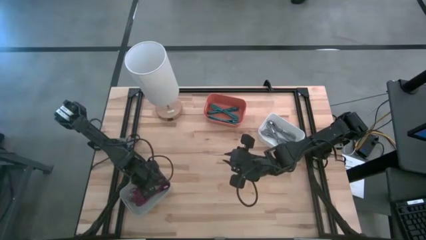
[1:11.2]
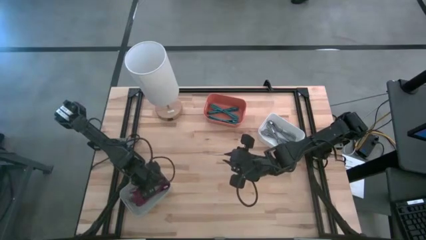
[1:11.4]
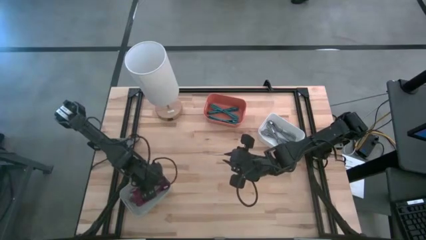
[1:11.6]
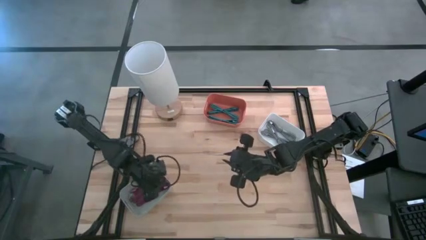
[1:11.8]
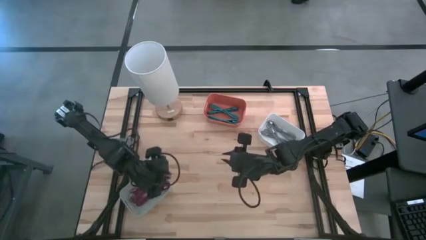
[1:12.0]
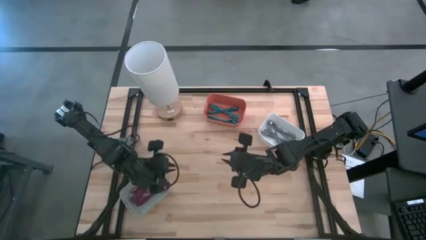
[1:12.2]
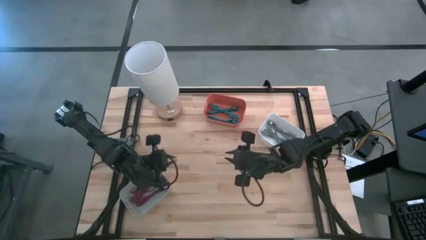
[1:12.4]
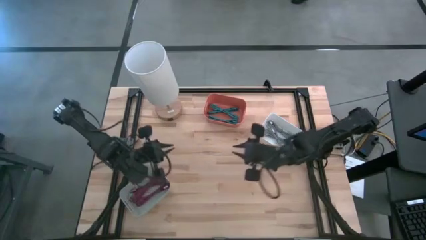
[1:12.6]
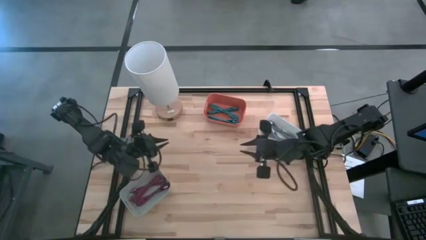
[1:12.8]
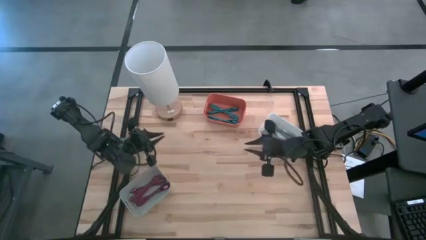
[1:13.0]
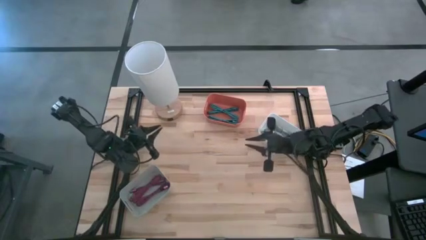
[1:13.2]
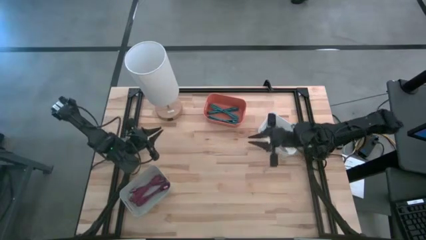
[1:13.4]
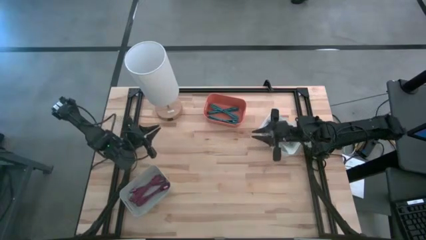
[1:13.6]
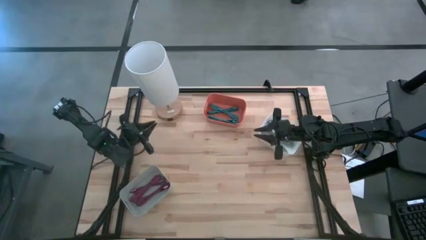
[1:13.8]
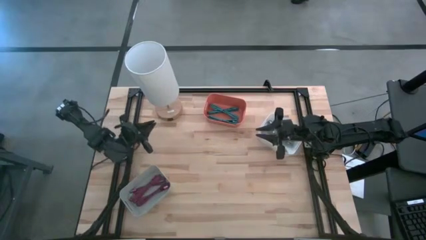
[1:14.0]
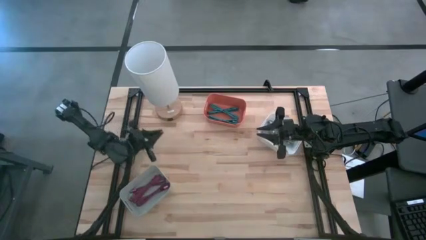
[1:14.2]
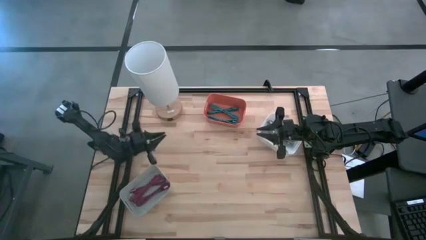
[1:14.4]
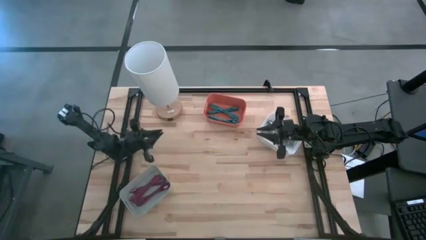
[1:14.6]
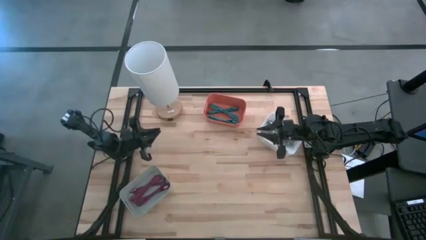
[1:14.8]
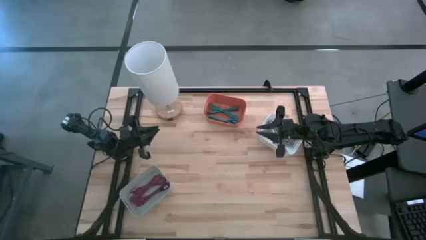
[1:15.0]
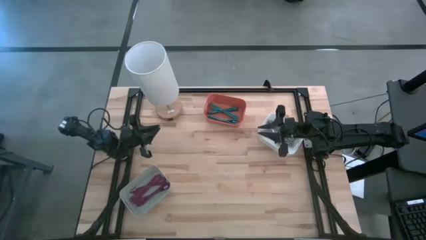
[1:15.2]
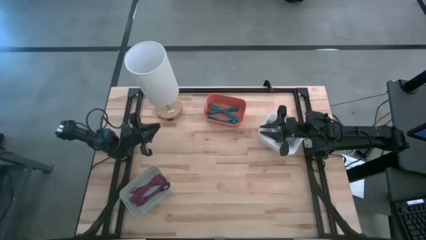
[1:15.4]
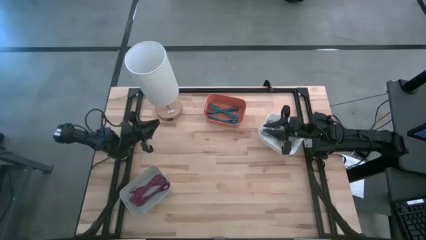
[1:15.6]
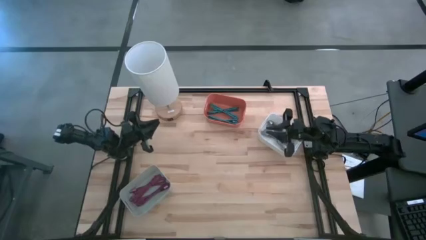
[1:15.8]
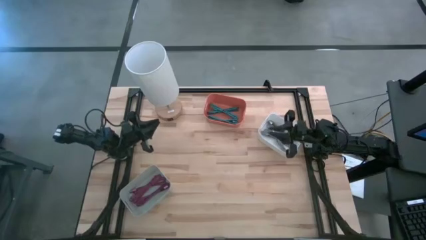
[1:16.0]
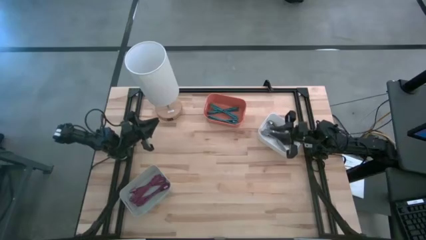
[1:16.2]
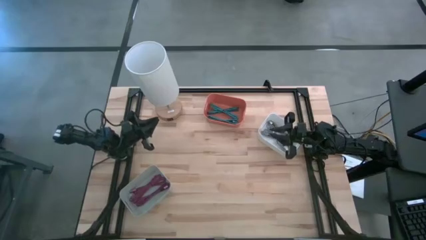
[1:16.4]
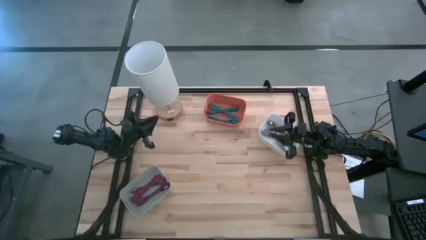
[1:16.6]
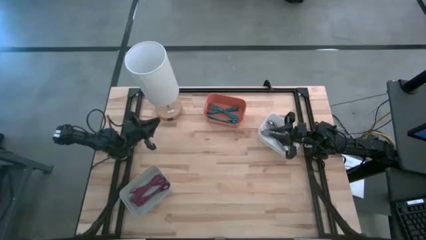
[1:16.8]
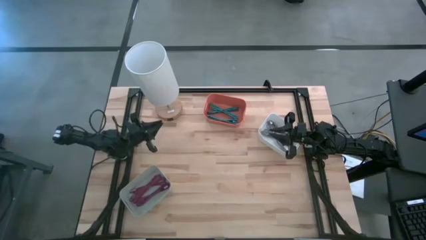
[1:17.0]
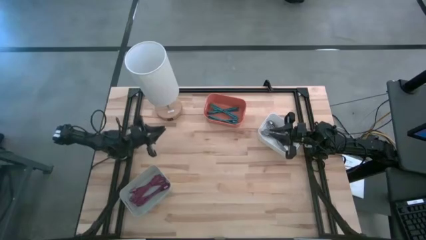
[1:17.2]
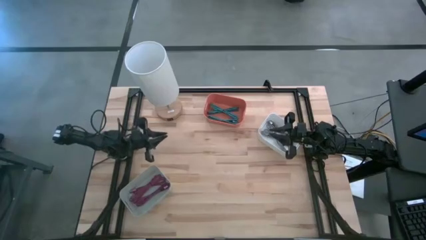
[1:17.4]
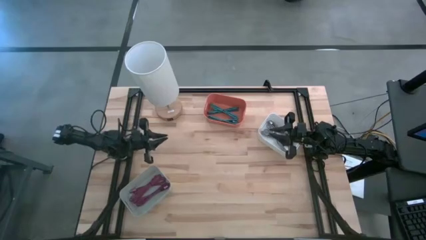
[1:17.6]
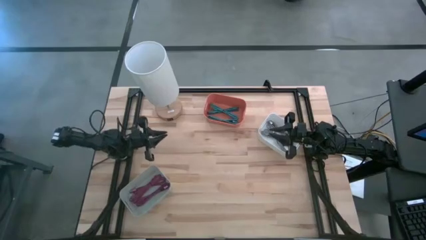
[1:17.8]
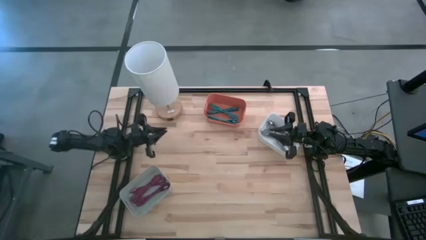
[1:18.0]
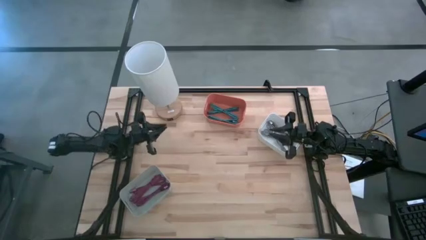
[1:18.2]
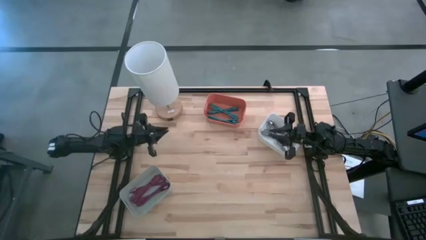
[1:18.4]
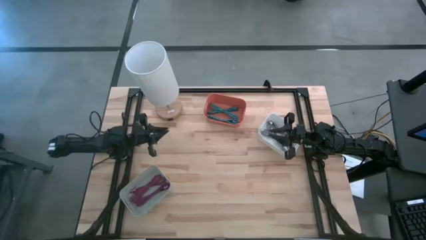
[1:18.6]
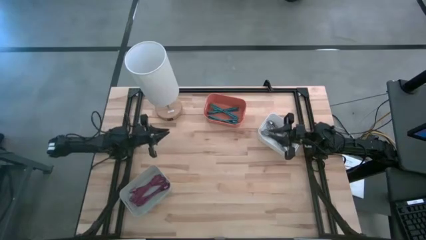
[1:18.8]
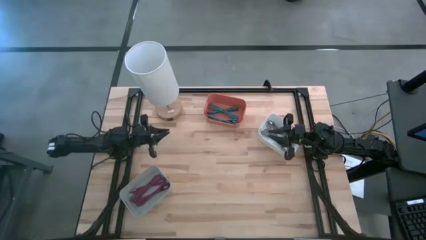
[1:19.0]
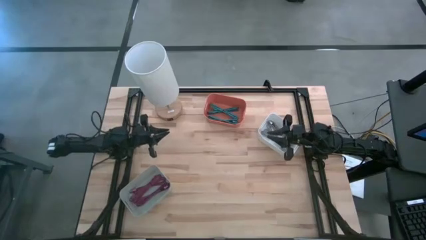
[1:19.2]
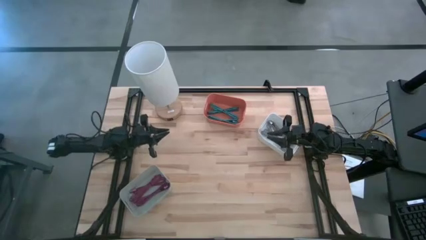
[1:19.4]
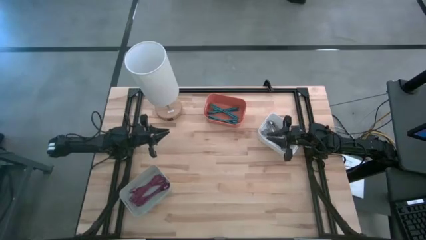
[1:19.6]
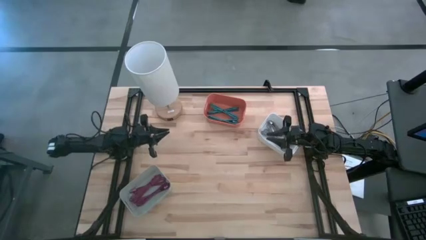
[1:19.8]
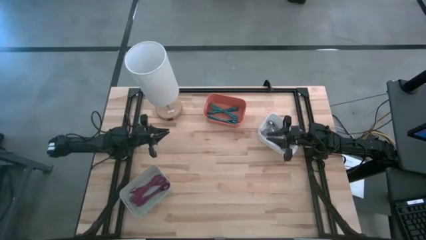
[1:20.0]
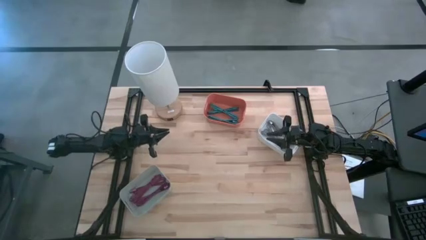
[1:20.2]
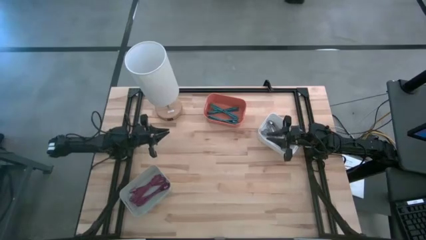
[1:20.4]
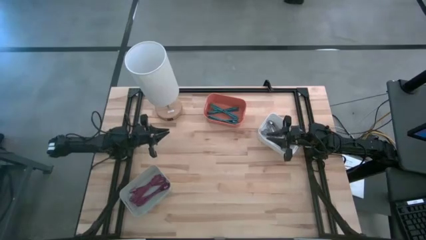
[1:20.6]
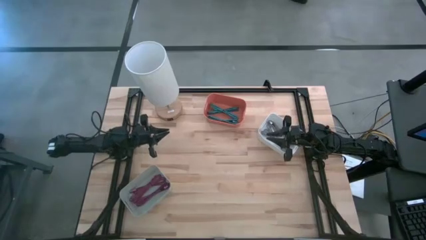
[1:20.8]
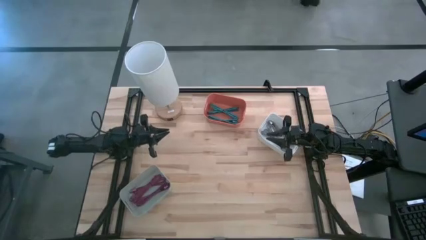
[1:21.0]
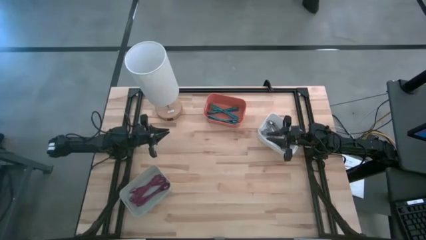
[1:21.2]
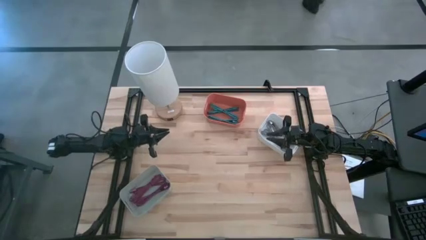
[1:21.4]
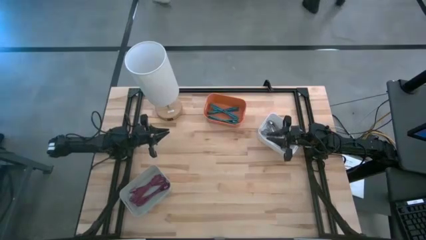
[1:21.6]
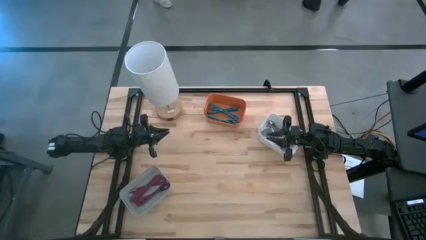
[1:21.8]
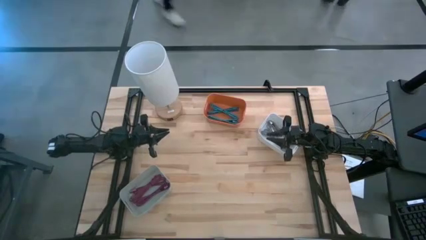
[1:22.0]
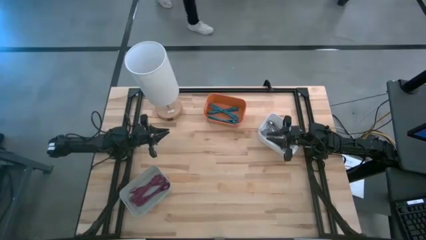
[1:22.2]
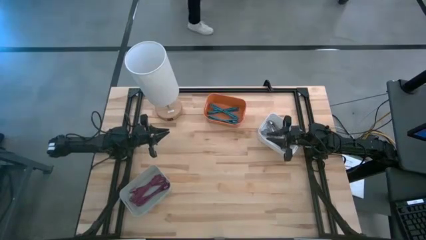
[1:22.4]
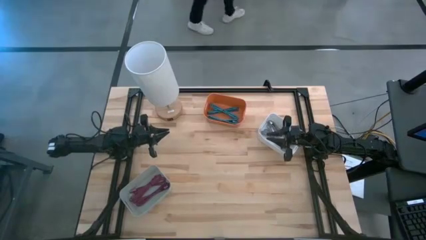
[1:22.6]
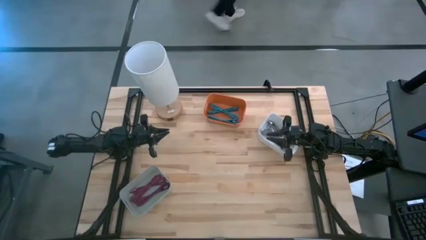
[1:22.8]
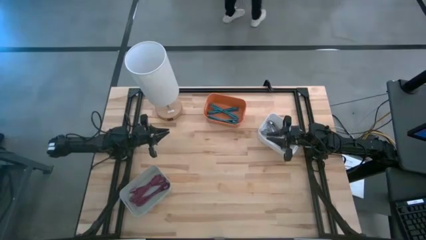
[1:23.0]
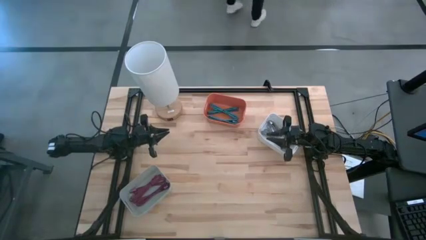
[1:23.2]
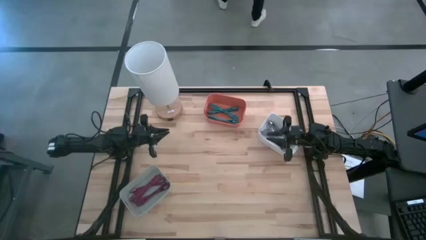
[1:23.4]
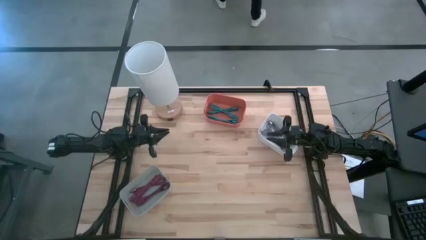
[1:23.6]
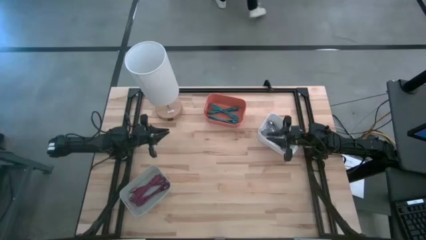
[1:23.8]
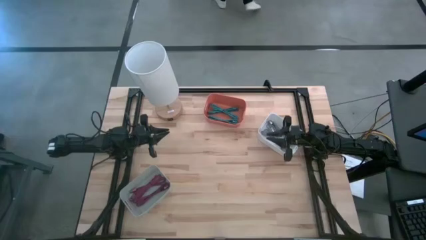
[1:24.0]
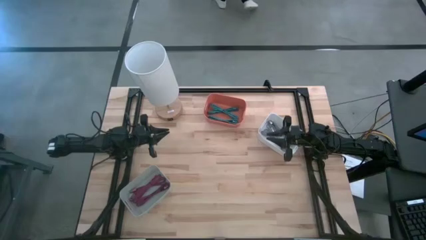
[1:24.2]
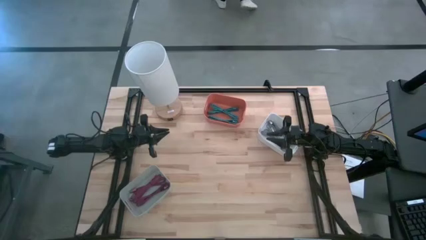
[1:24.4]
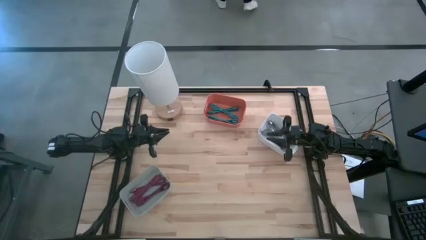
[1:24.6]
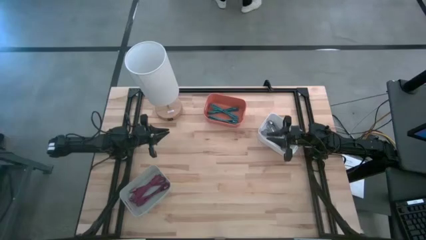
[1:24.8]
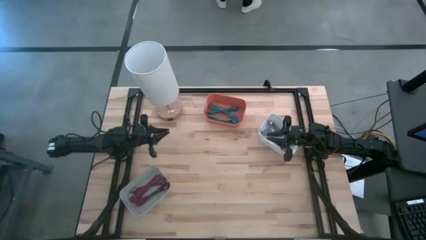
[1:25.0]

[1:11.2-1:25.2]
Task: Pick & Place USB Port
Return to Home Position

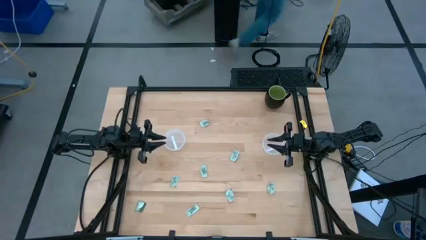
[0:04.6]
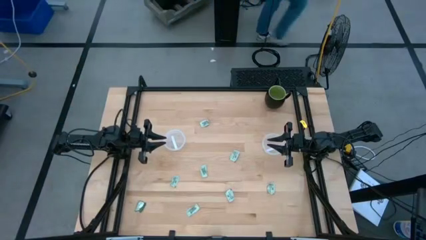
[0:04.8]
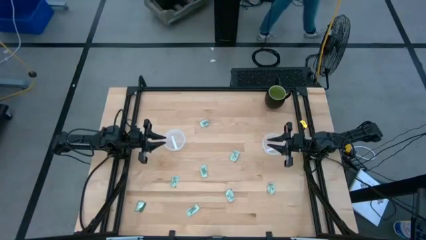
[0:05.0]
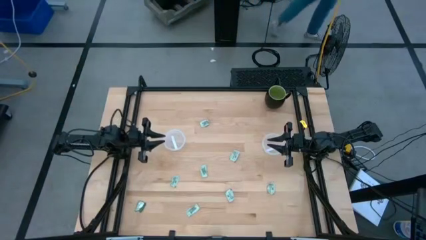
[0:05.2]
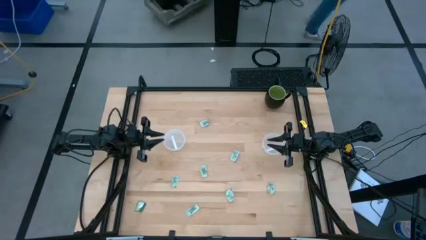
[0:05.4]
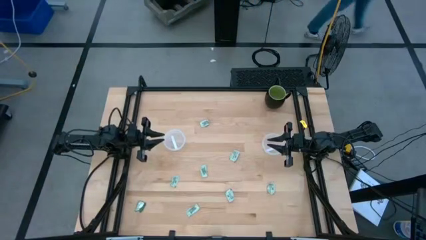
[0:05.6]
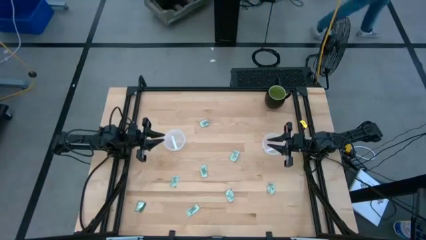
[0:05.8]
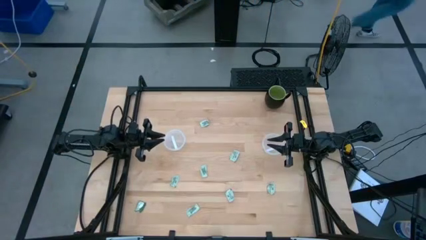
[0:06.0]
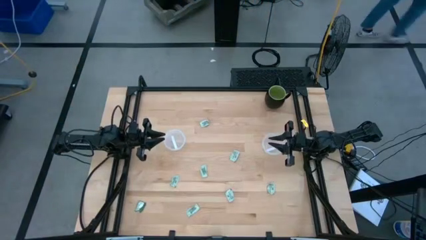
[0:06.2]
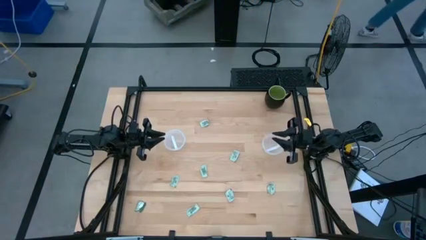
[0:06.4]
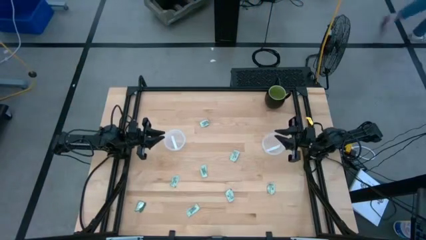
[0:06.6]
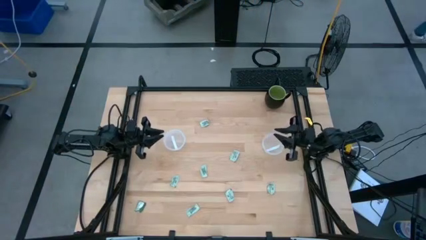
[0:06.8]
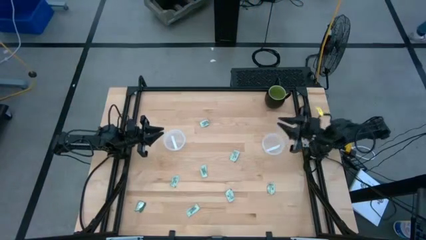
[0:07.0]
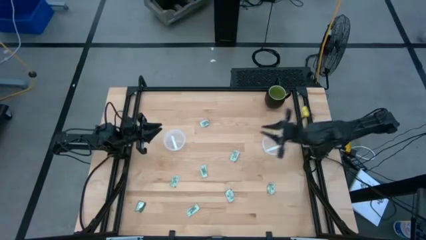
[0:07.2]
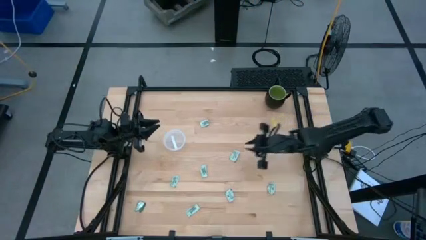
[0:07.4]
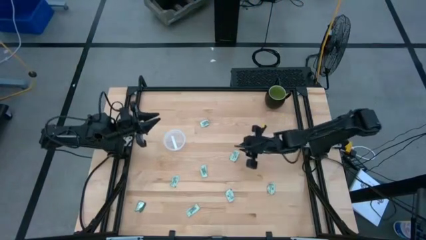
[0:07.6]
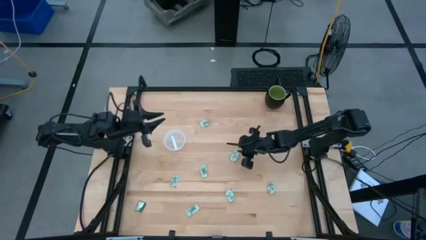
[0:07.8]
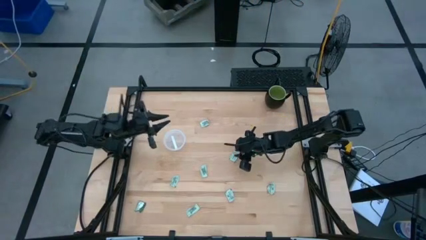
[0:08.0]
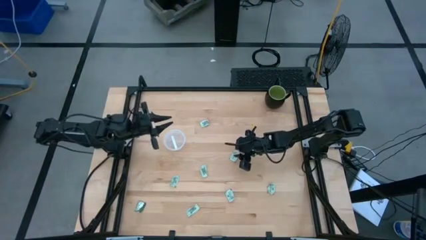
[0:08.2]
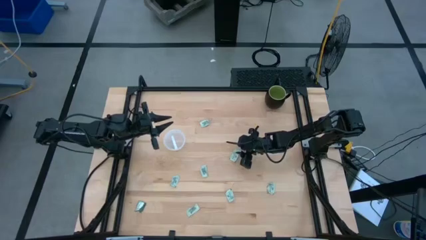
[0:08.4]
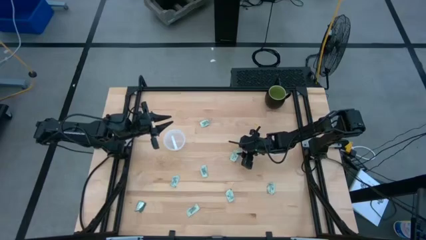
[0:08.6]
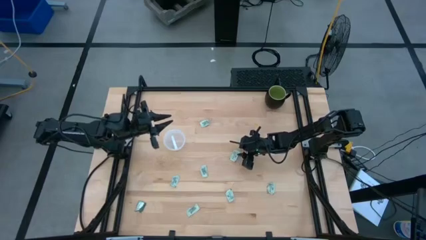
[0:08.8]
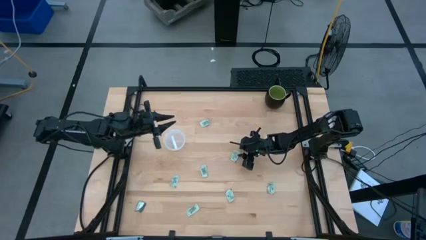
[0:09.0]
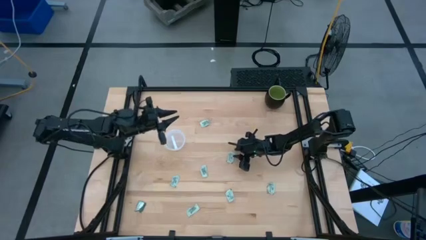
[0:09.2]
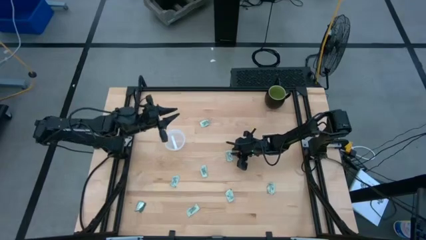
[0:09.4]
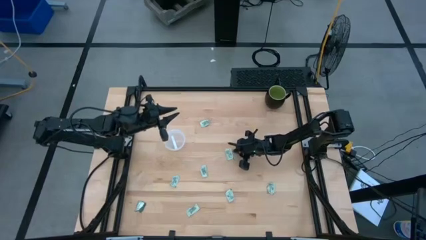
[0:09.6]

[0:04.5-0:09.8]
Task: Pick and place items into bin
Put the stevia packet into the right transparent bin
